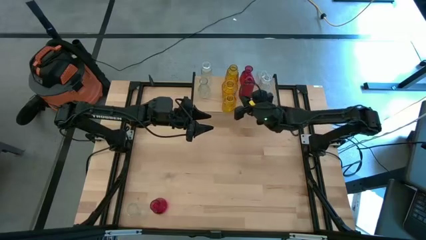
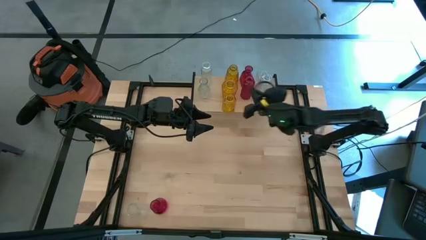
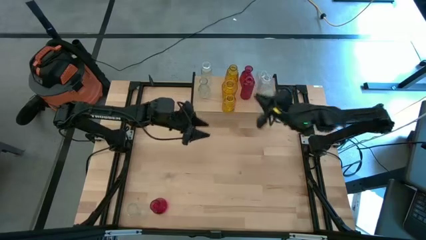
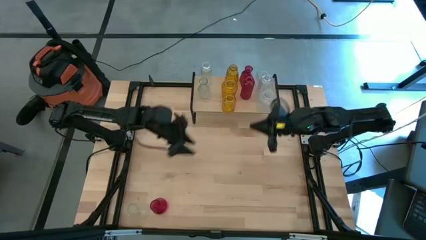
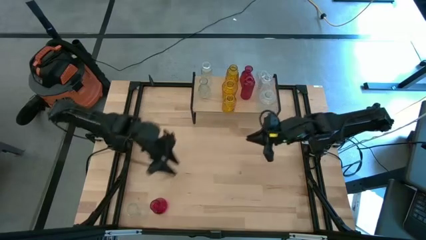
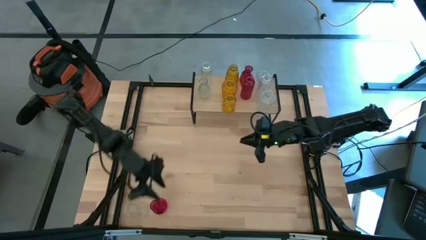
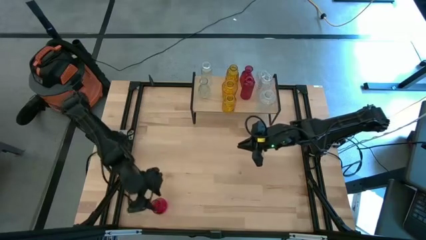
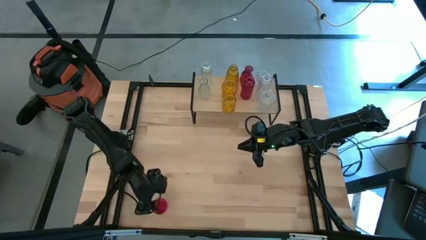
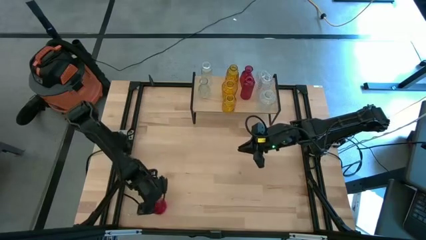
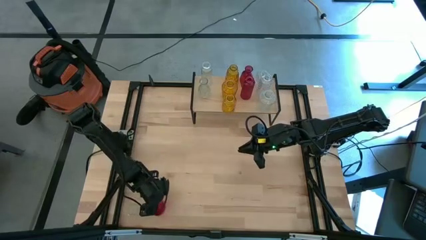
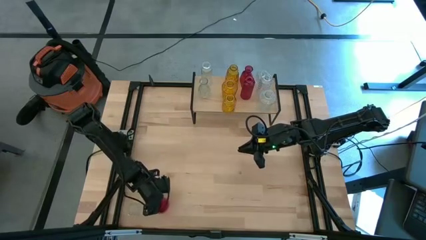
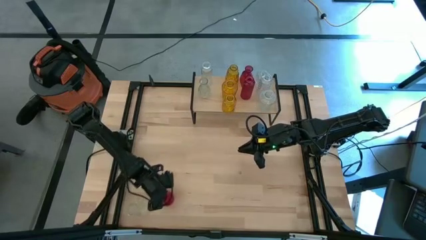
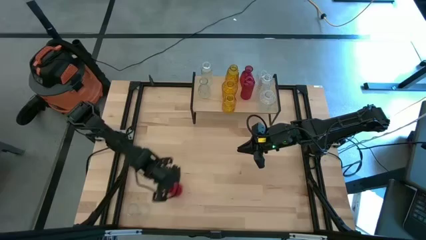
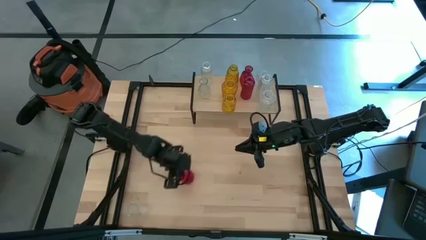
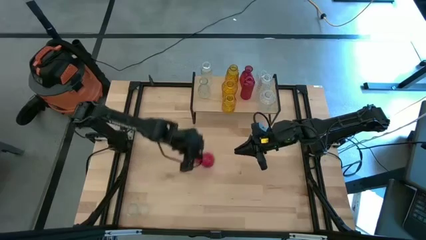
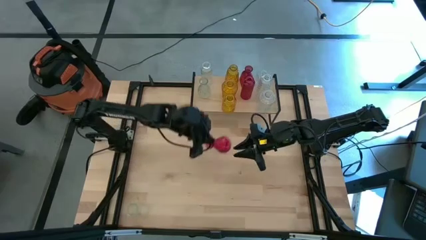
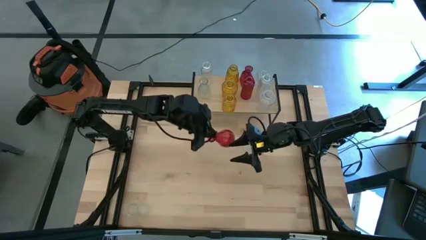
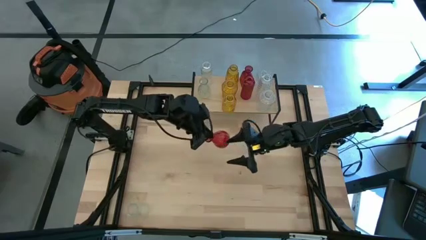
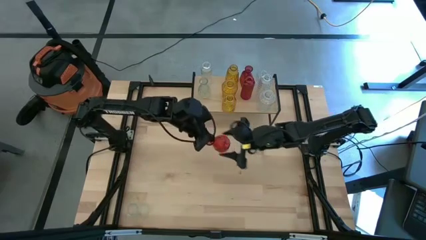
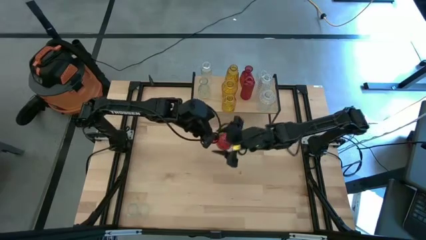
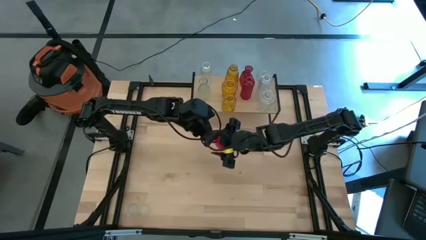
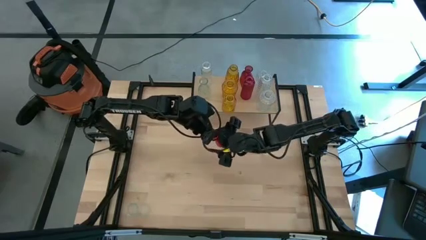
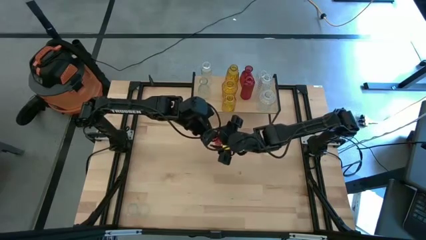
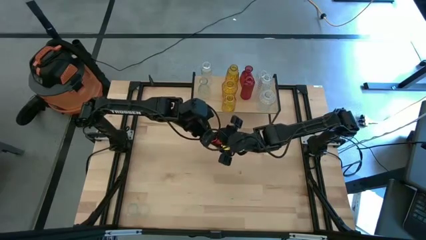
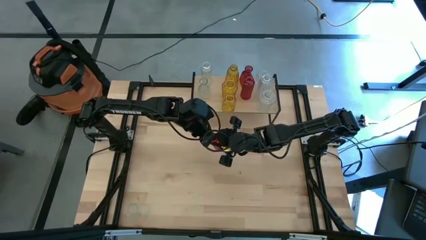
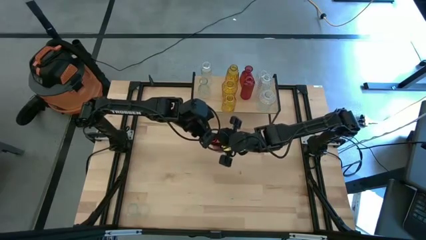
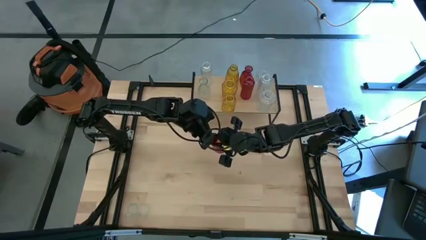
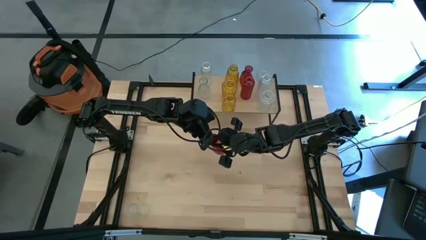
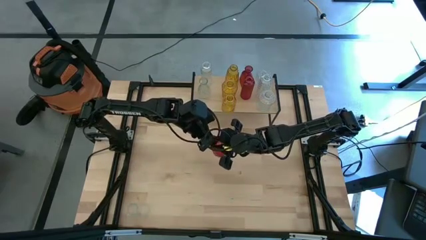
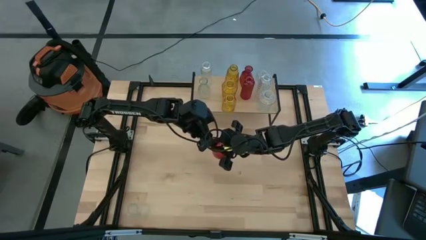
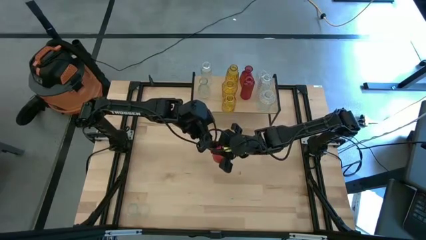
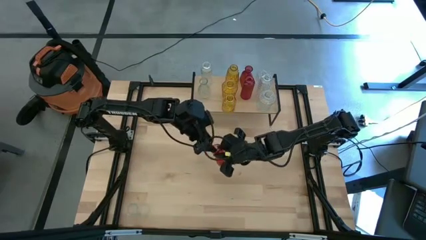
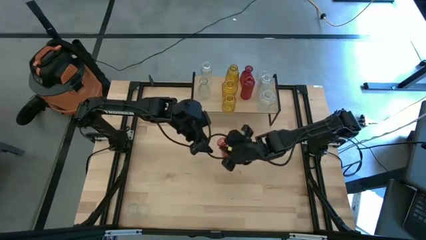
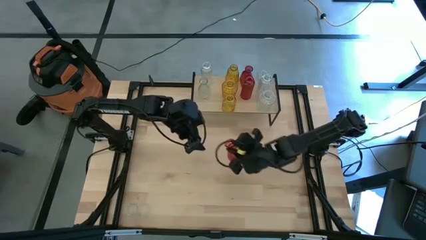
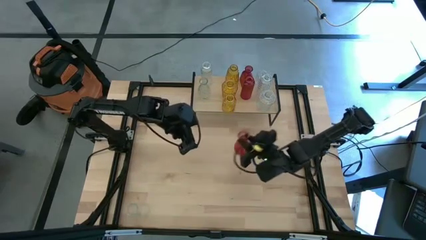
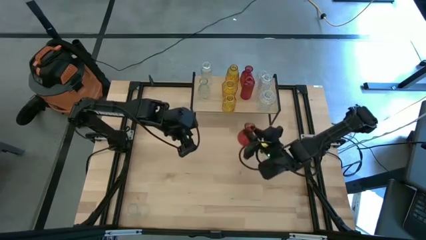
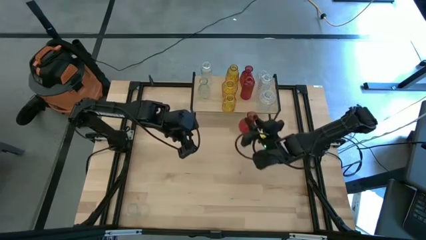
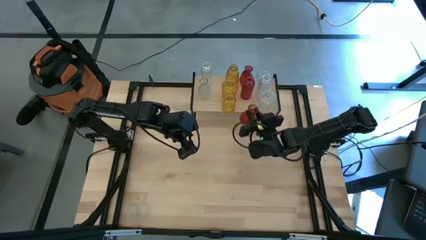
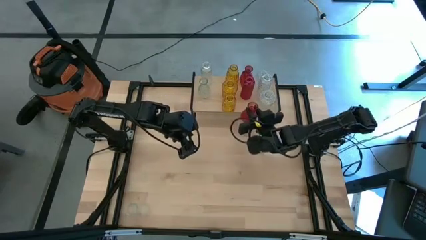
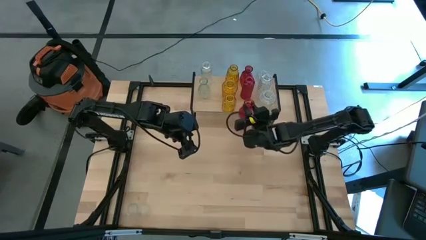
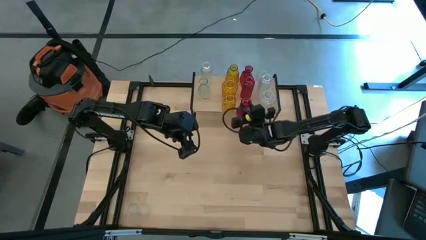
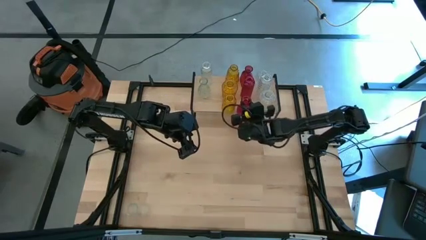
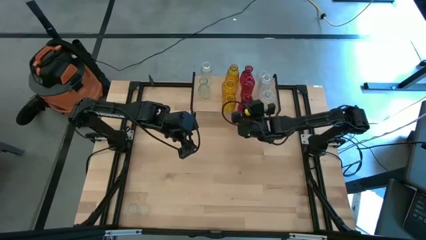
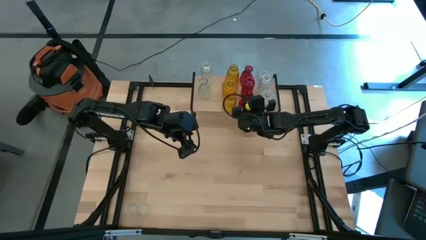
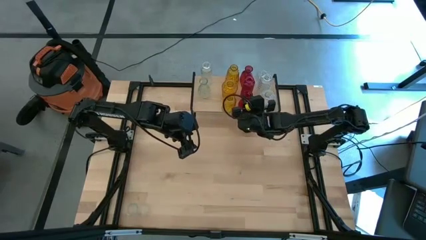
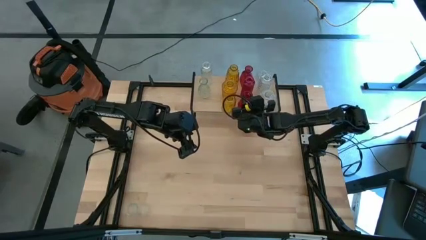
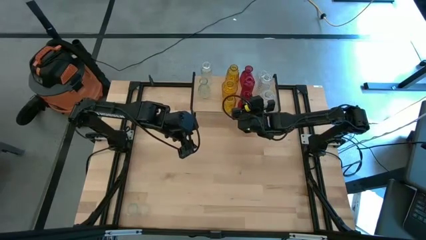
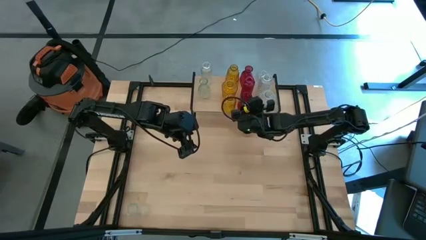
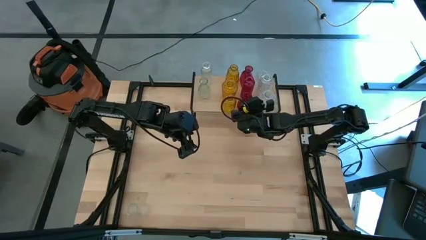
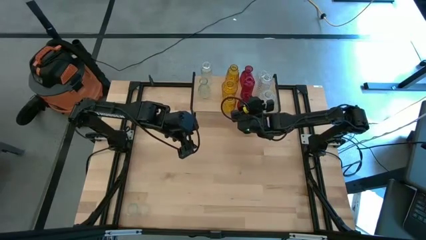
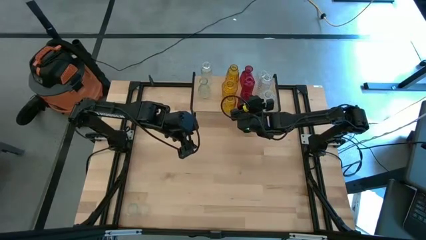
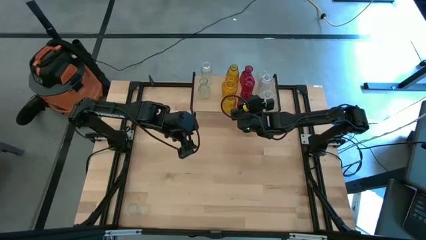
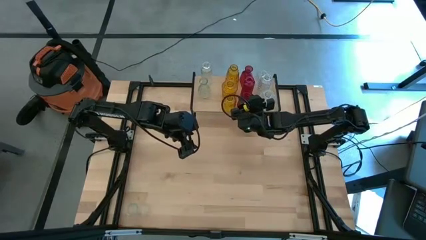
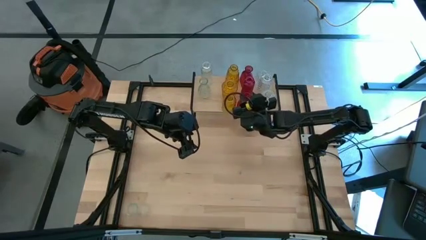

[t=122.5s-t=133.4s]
Task: sort vases onto shelf
Put the red vase on the shelf aligned with the other red vase

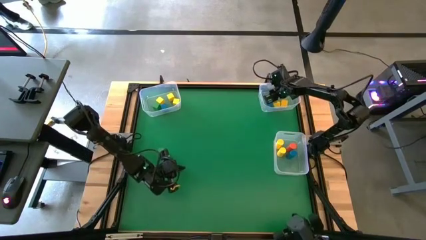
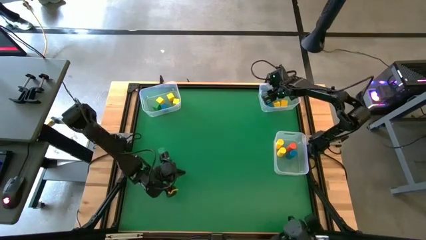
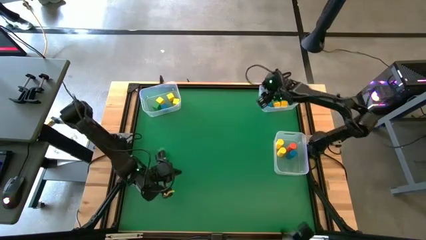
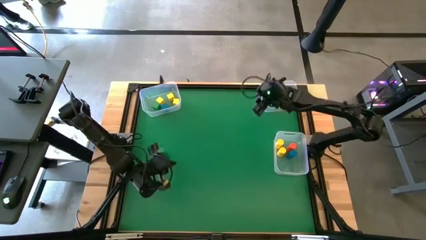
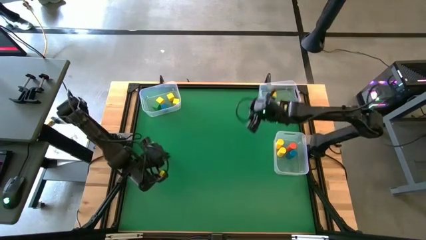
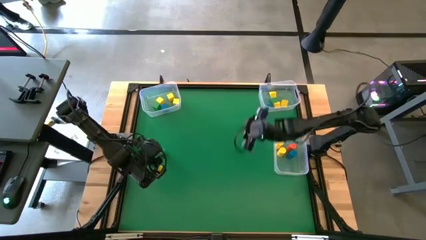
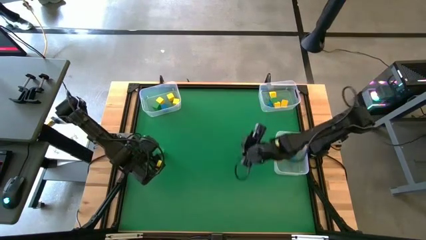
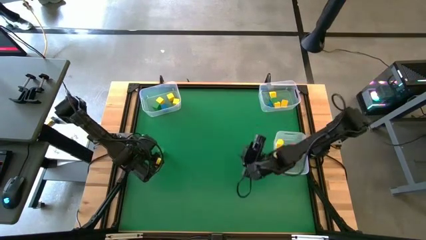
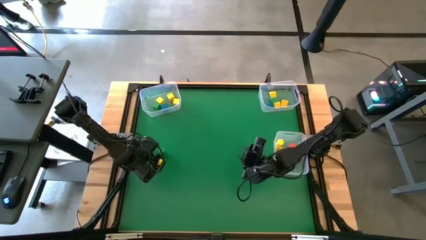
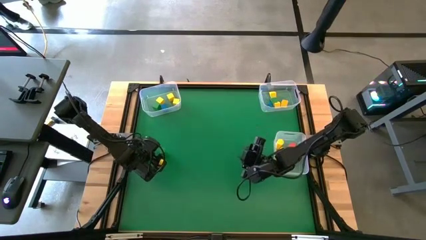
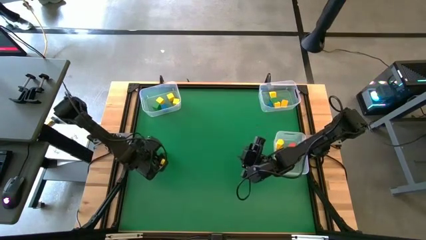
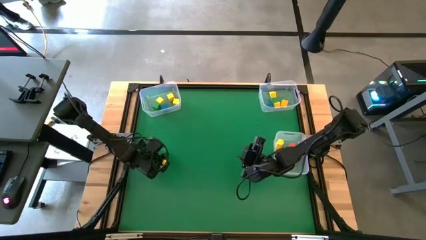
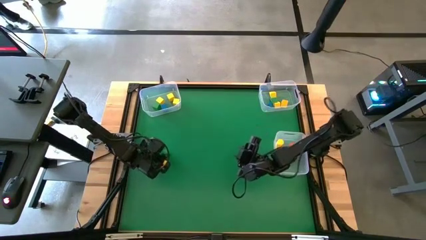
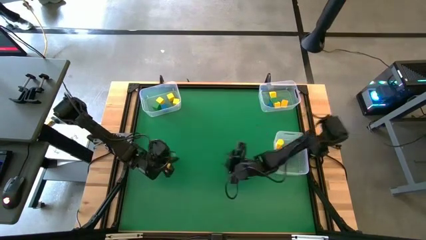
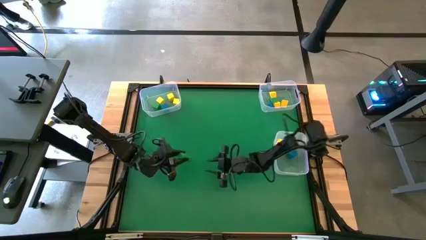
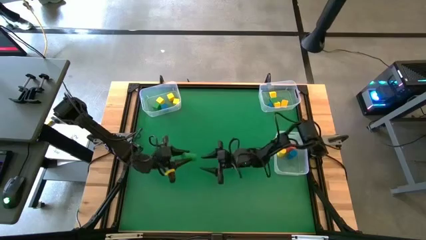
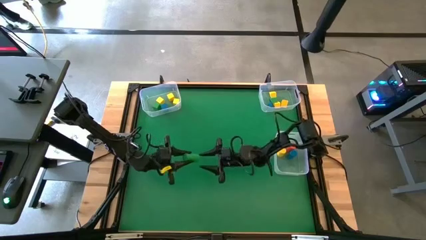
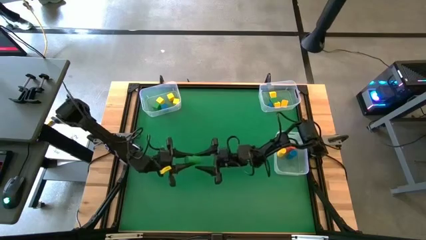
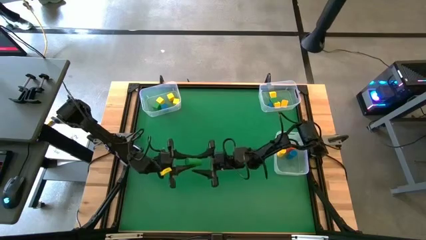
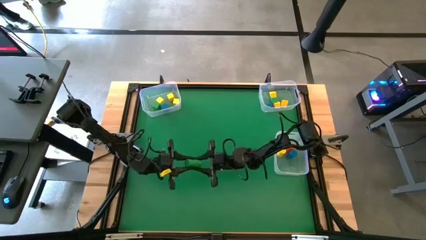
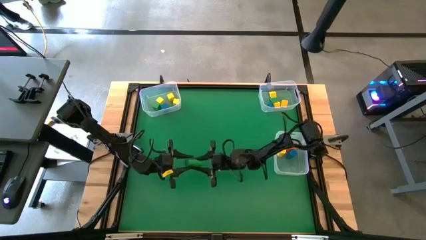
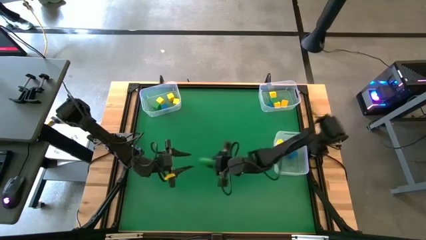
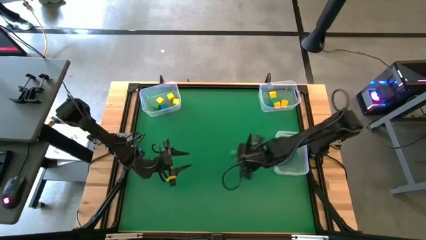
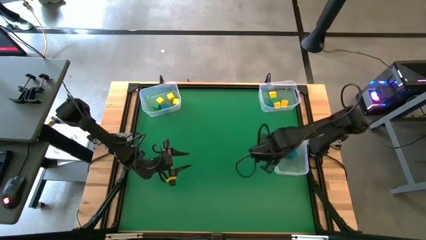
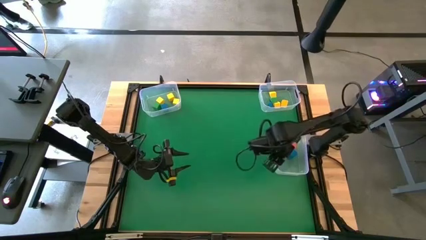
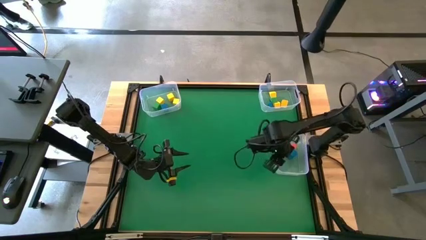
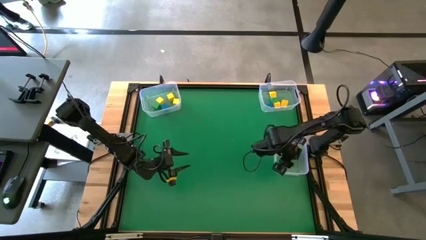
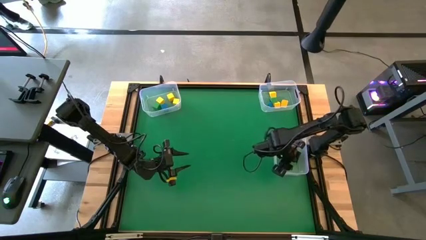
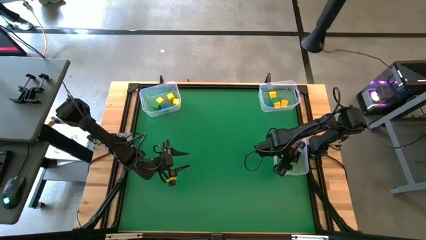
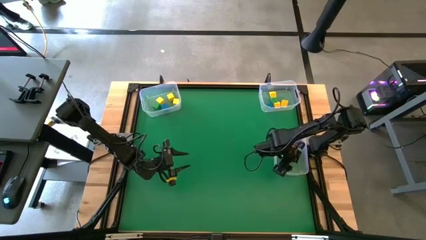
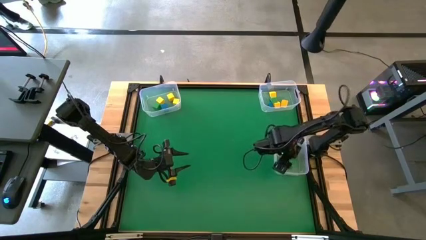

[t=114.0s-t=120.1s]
Task: Sort blocks by size
Put the green cylindrical block into the bottom transparent bin
